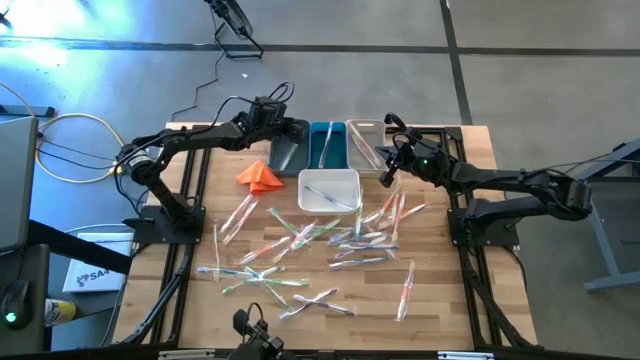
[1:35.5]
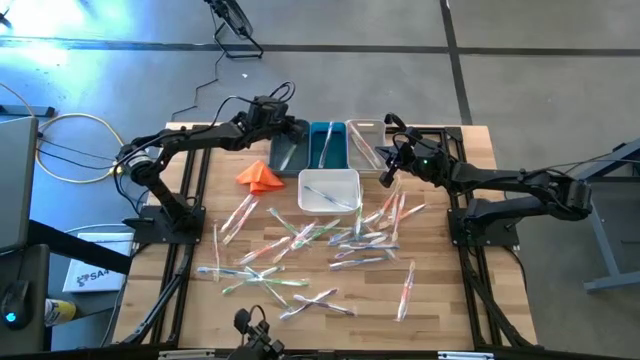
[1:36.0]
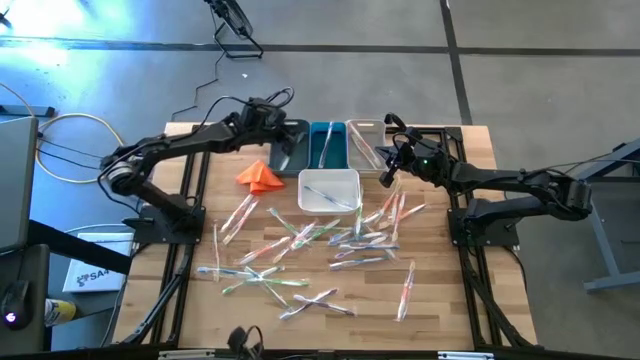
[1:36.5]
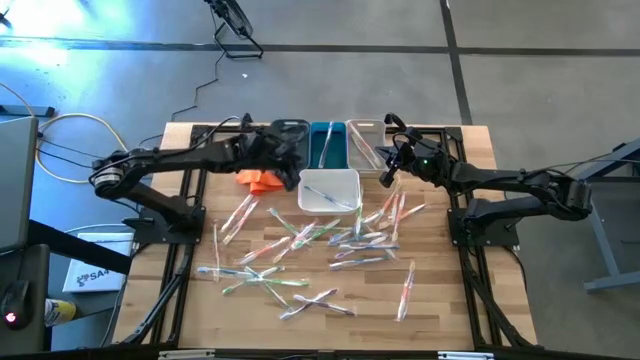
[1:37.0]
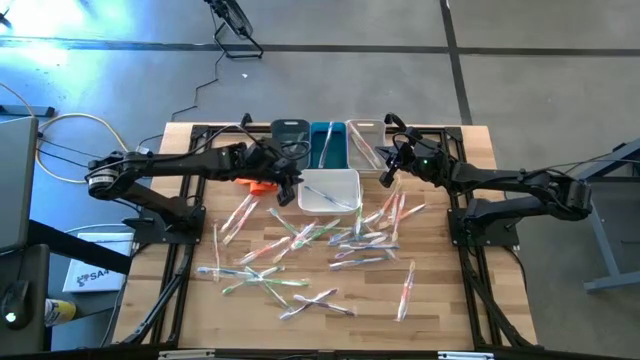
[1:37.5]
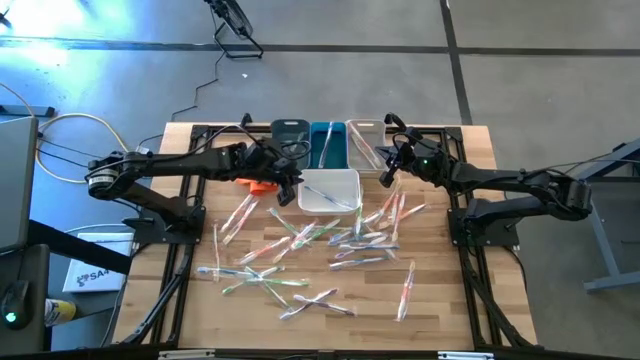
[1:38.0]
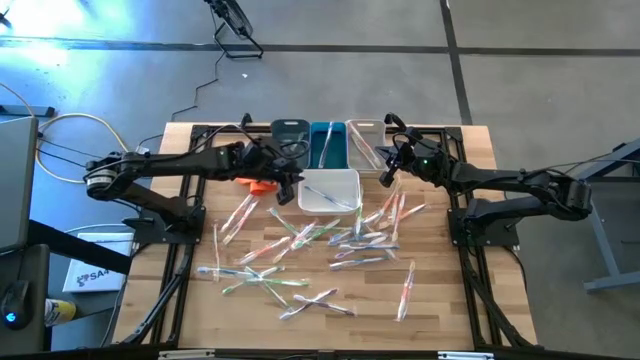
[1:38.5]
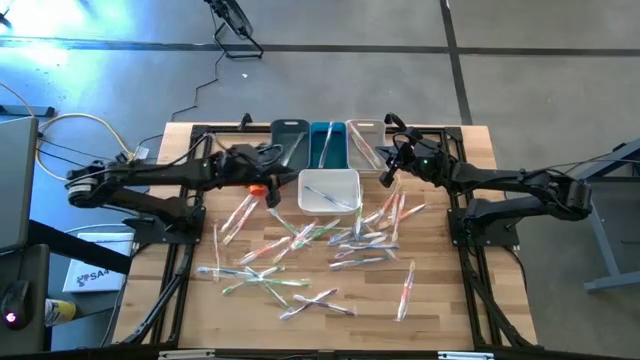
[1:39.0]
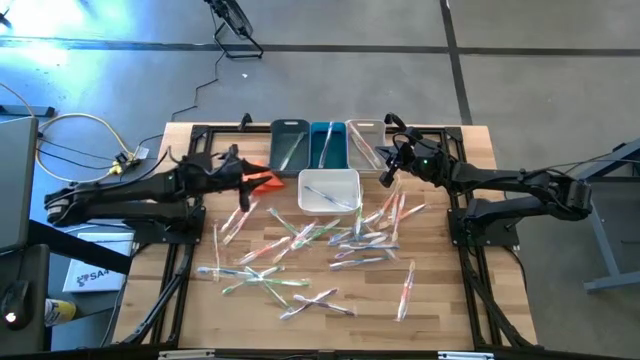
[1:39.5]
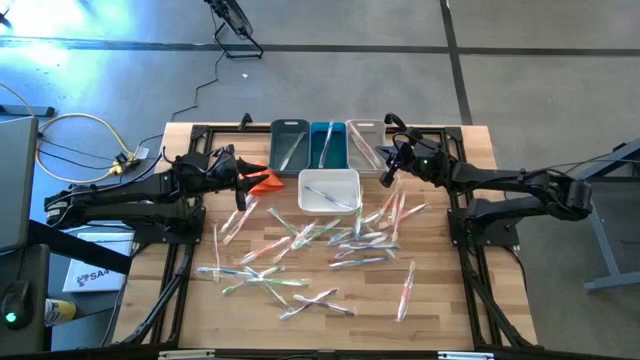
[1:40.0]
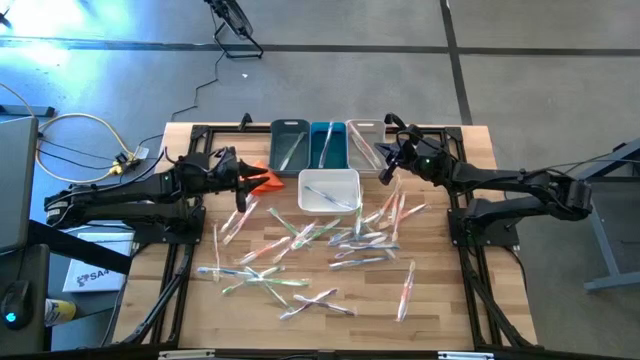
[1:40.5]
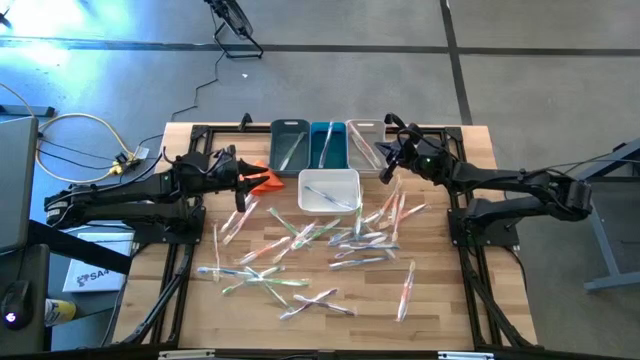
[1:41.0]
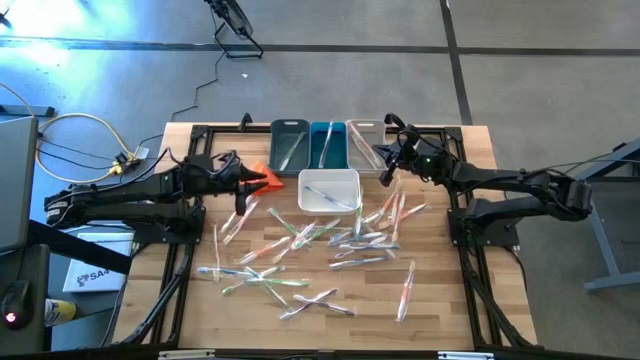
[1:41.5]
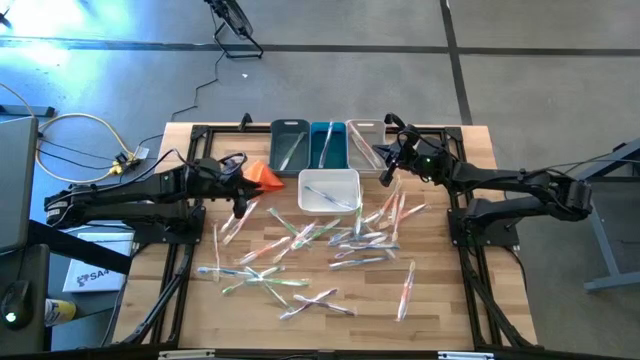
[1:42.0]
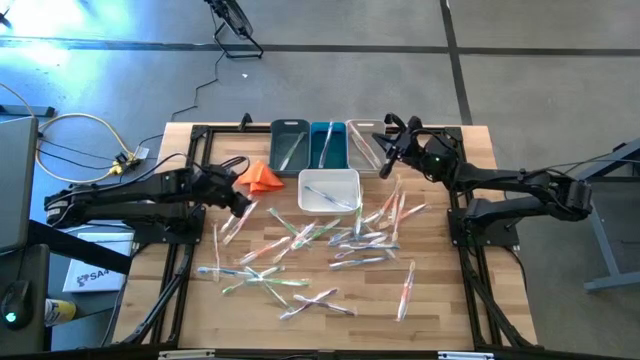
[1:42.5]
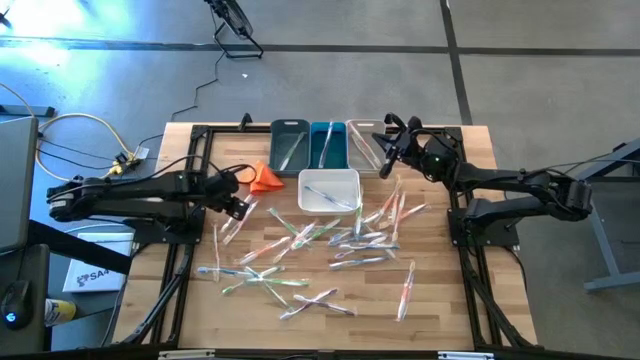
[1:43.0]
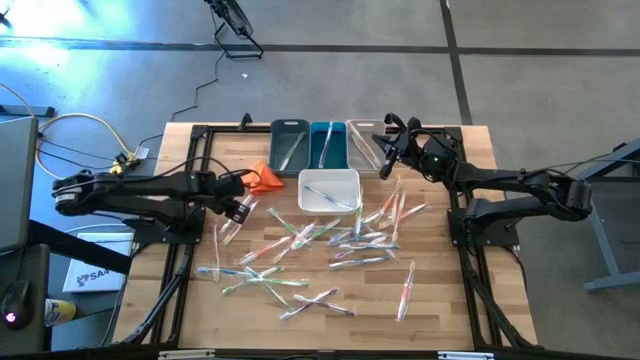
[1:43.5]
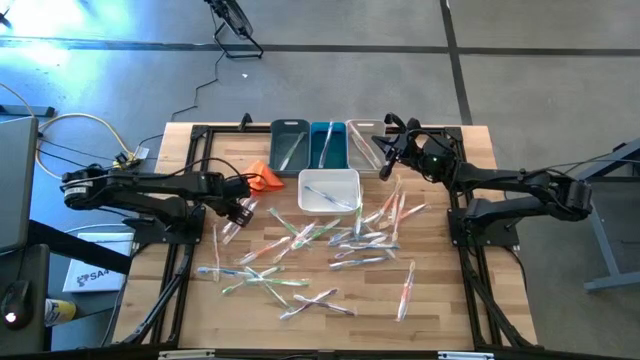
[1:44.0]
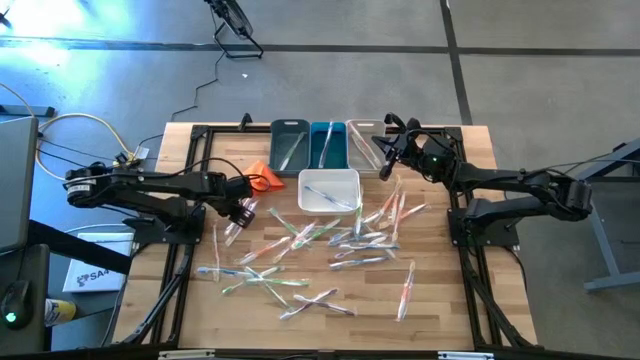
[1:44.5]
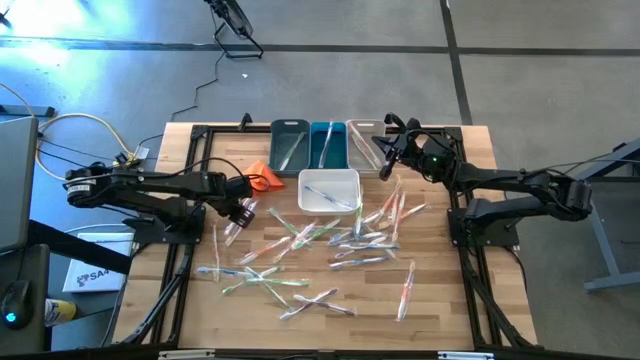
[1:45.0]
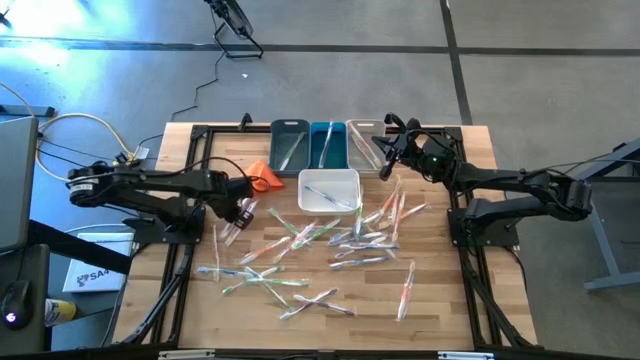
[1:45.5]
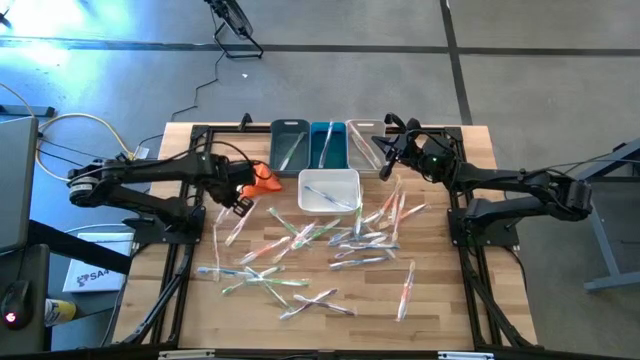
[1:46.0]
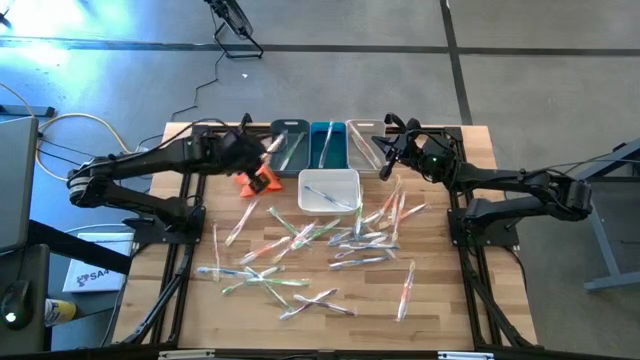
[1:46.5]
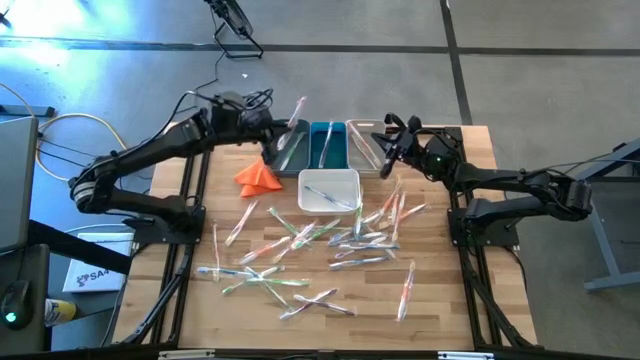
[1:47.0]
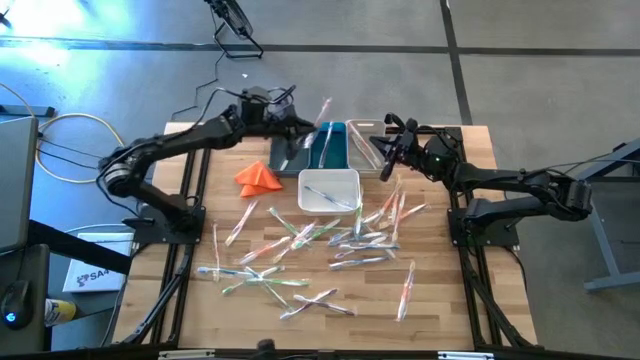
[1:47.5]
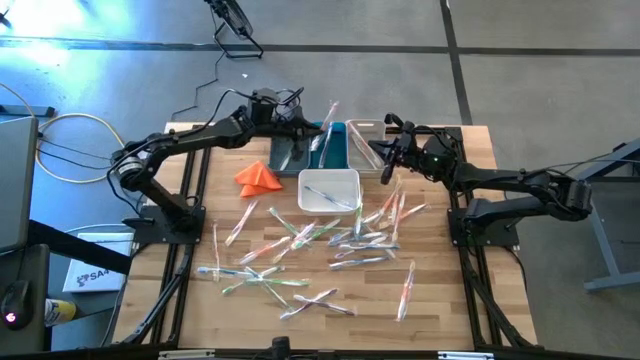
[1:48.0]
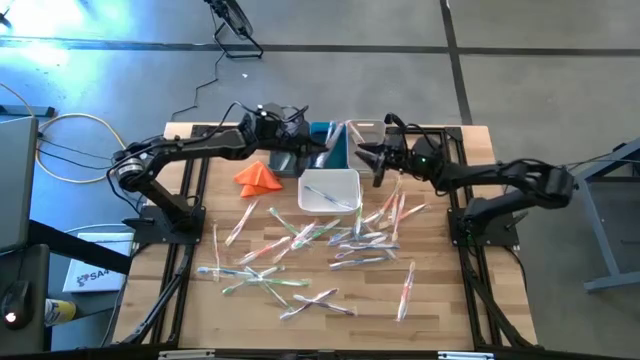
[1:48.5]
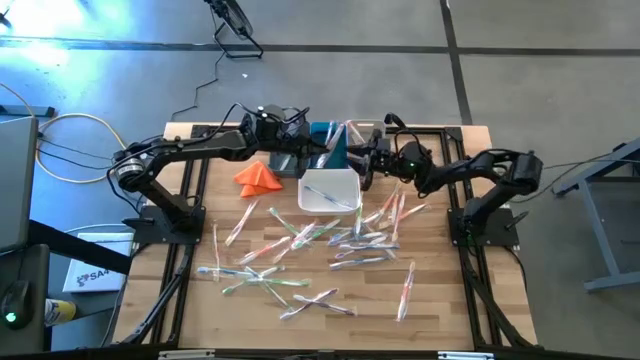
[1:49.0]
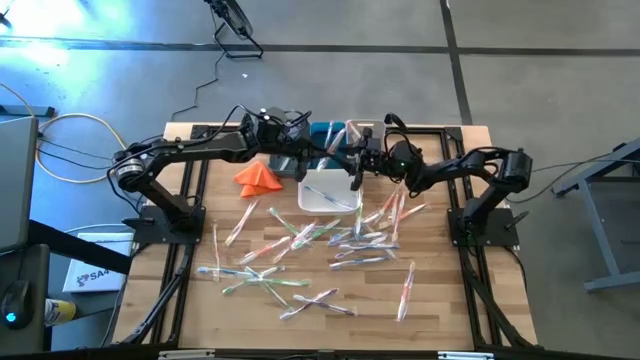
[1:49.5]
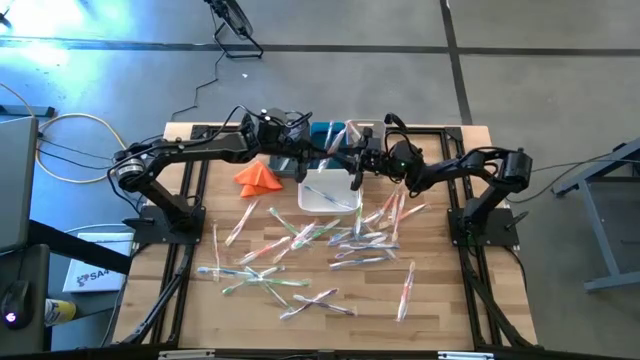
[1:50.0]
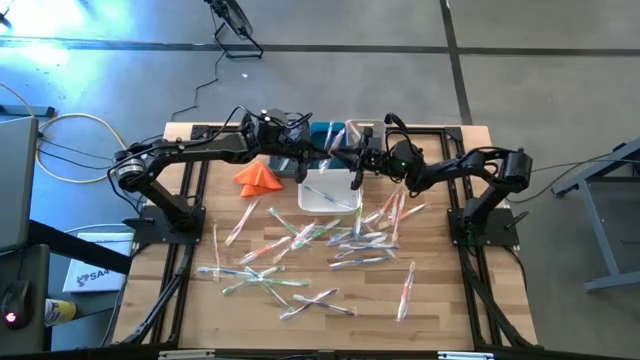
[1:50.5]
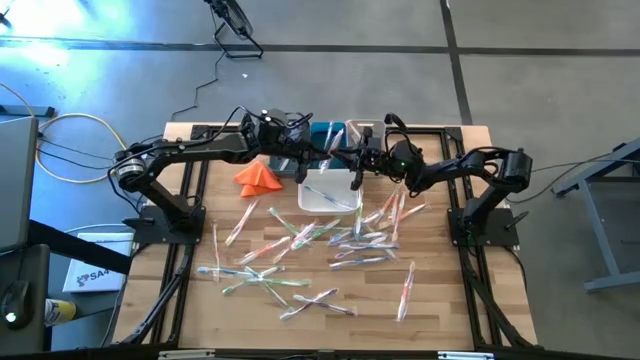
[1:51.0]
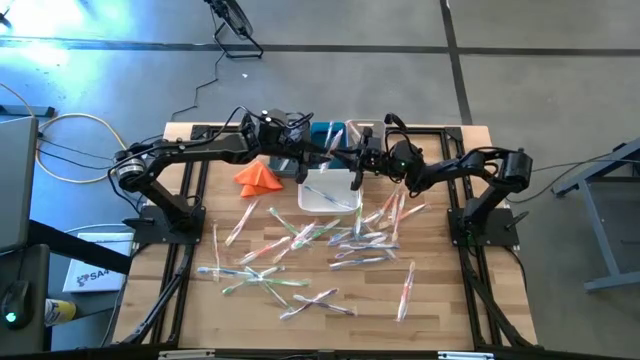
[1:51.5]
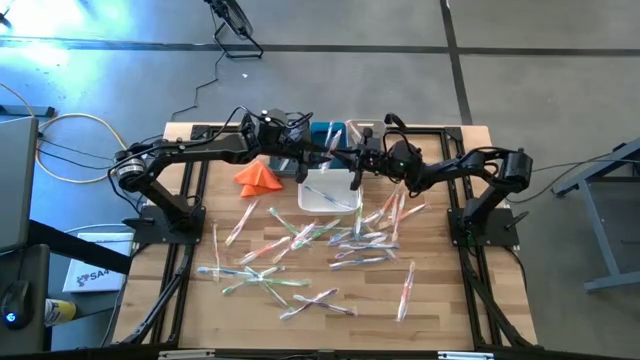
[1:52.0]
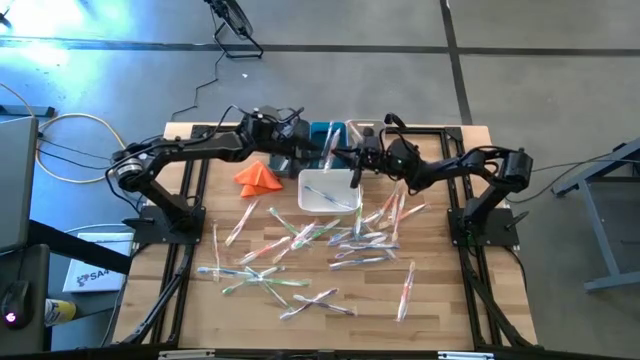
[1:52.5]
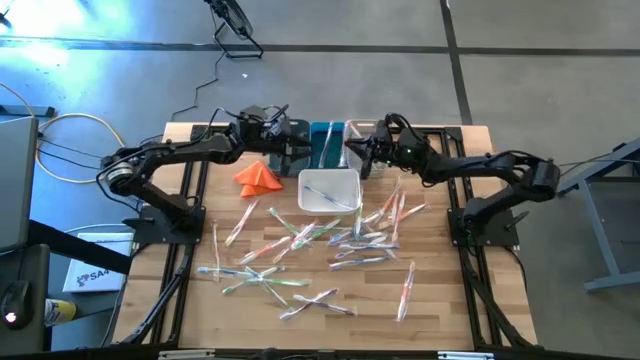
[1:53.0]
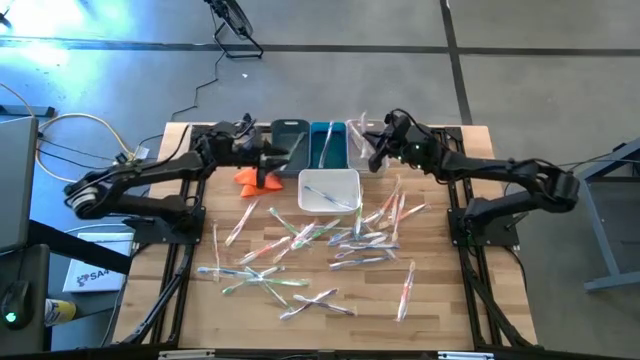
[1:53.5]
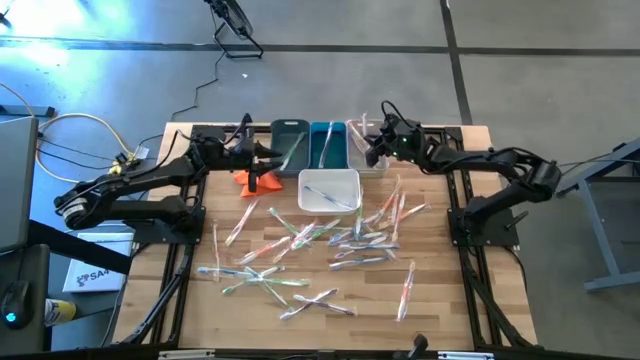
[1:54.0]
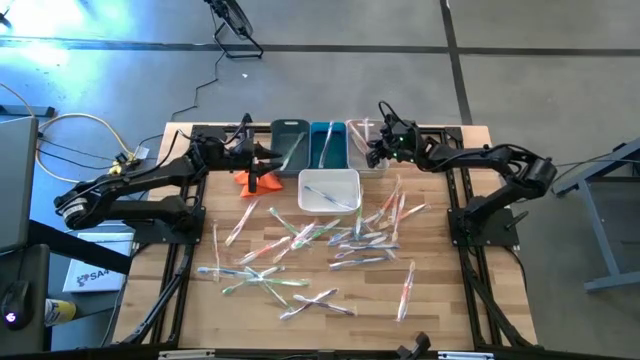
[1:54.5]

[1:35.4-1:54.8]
Task: Pick & Place Toothbrushes
Put the orange toothbrush into the gray bin

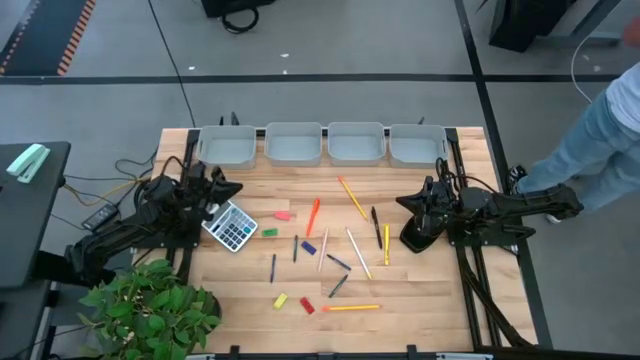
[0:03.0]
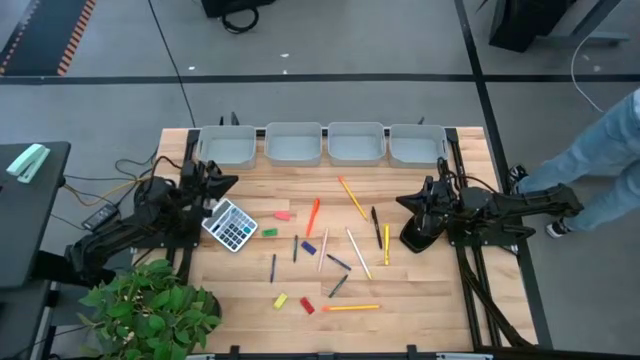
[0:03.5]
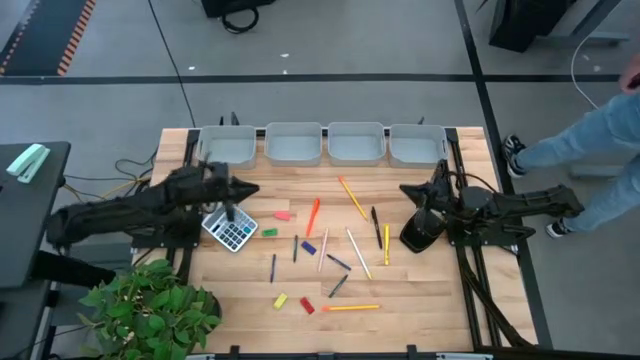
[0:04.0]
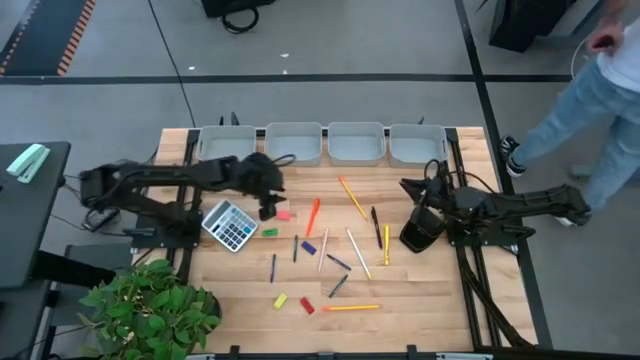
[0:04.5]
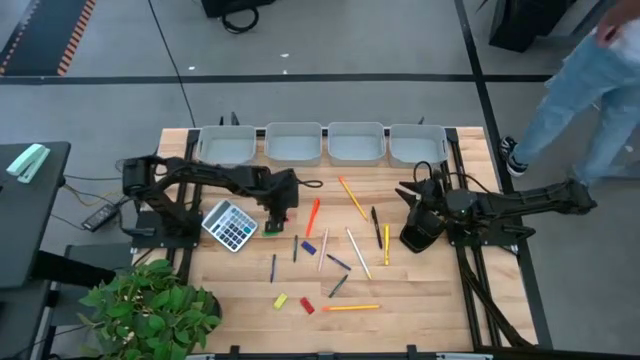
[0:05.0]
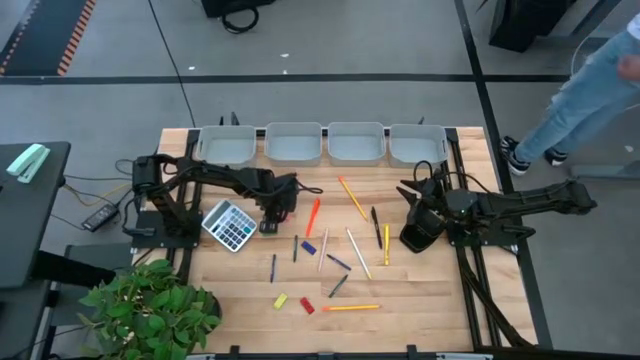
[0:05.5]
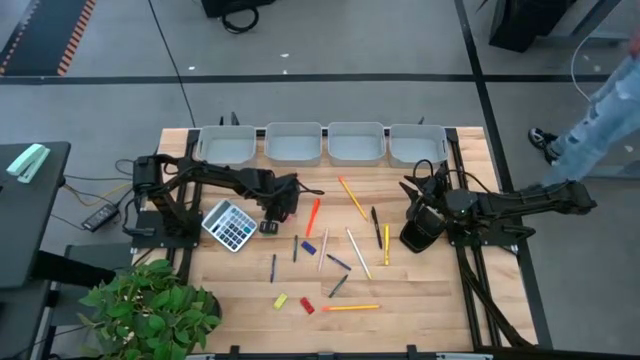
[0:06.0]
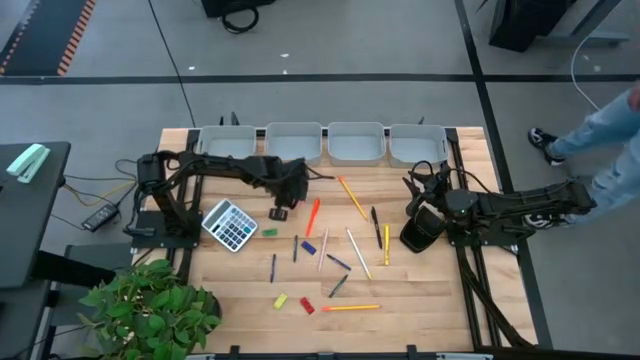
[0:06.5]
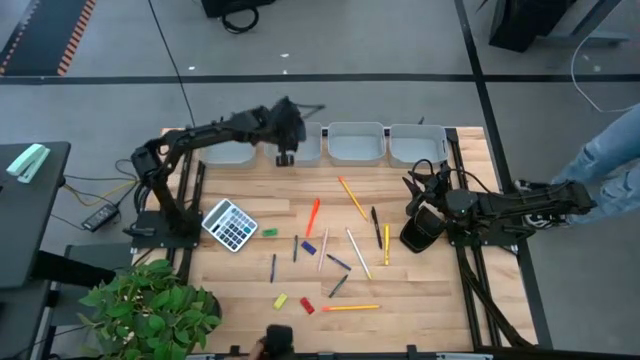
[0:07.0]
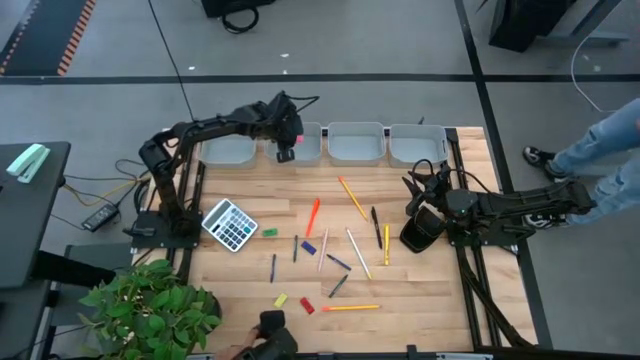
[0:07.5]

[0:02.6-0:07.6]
Task: Sort crayons/erasers/pens/pencils in bins
Put the pink eraser into the gray bin
